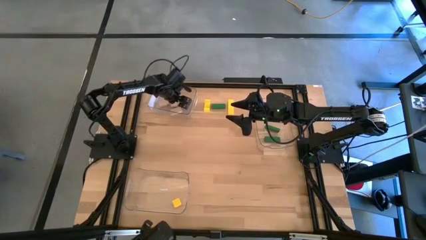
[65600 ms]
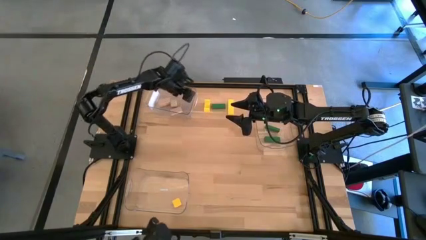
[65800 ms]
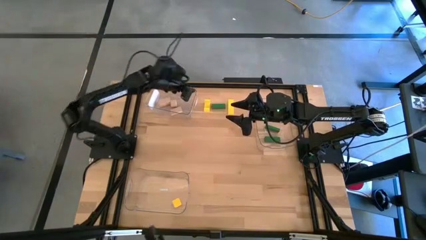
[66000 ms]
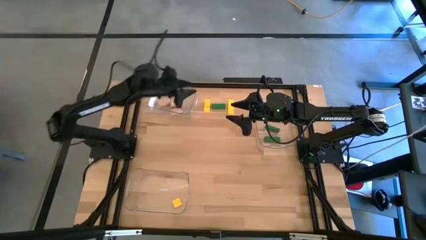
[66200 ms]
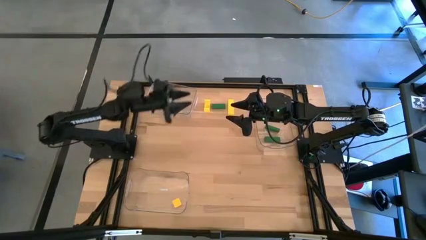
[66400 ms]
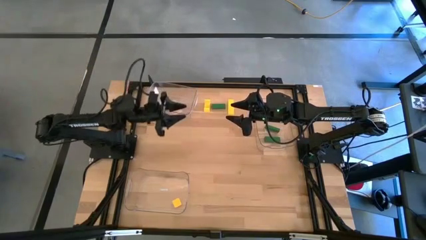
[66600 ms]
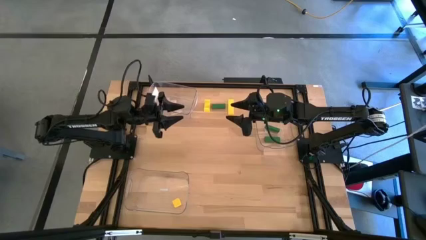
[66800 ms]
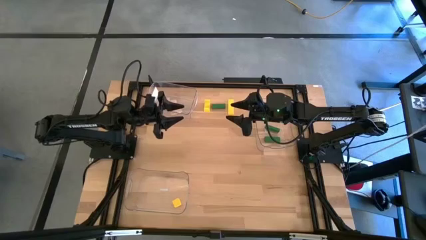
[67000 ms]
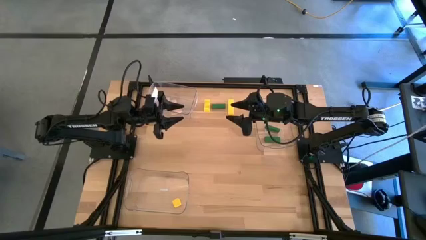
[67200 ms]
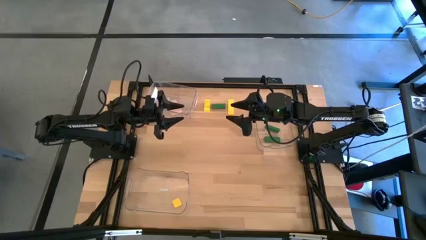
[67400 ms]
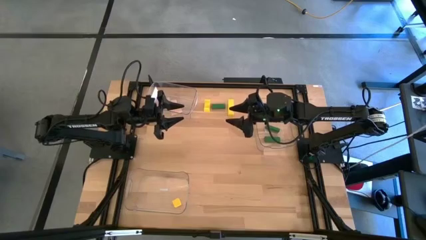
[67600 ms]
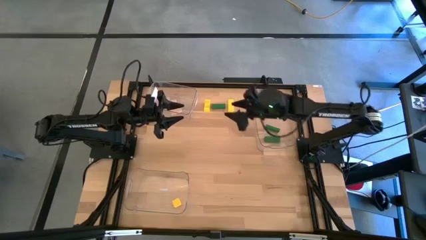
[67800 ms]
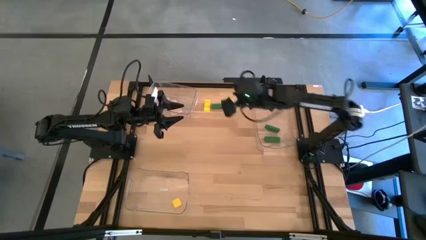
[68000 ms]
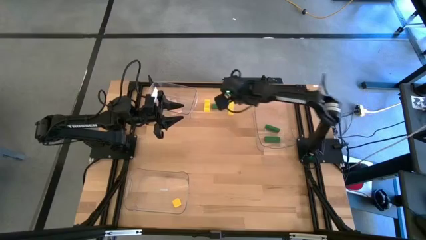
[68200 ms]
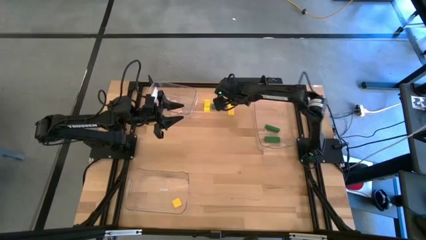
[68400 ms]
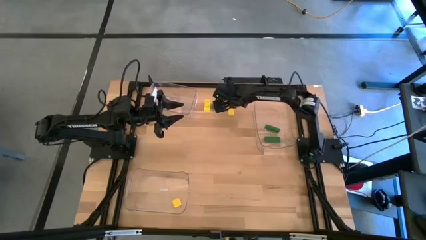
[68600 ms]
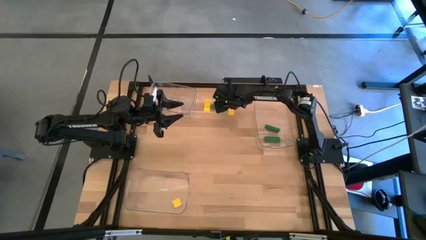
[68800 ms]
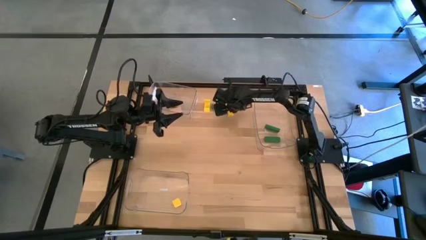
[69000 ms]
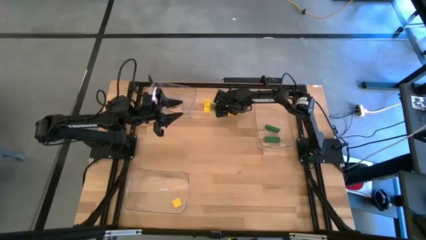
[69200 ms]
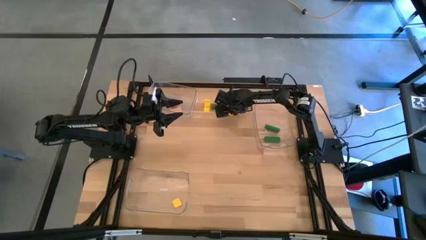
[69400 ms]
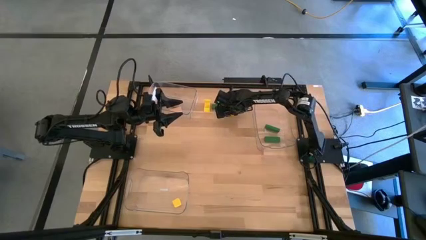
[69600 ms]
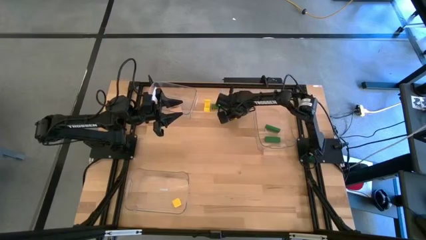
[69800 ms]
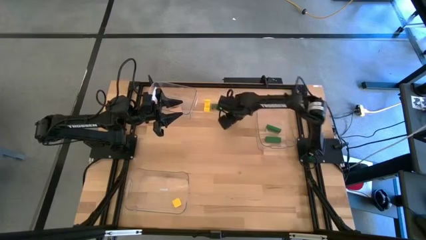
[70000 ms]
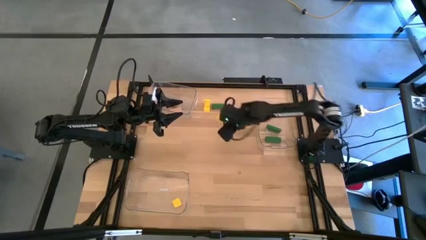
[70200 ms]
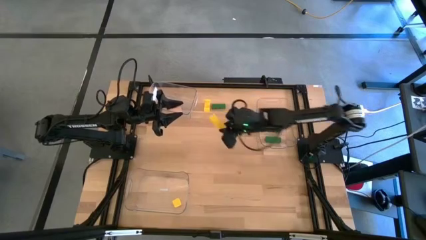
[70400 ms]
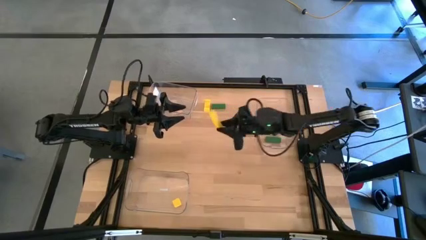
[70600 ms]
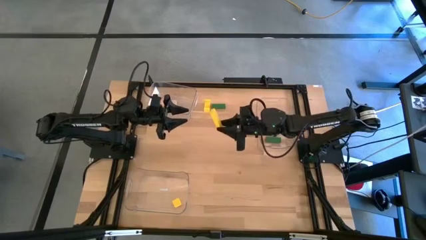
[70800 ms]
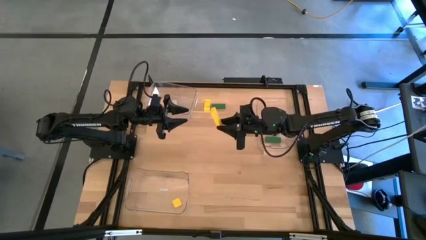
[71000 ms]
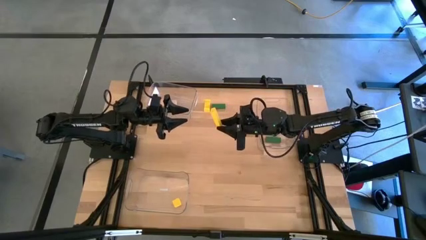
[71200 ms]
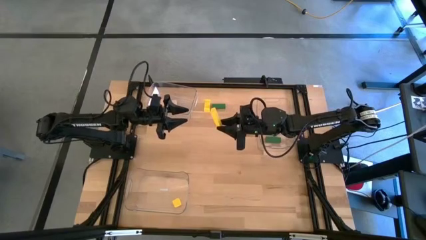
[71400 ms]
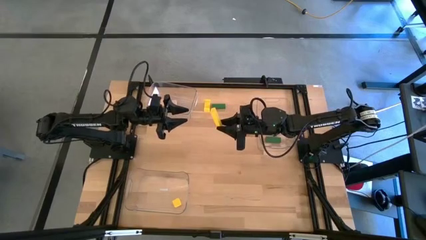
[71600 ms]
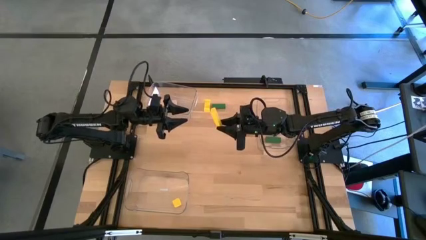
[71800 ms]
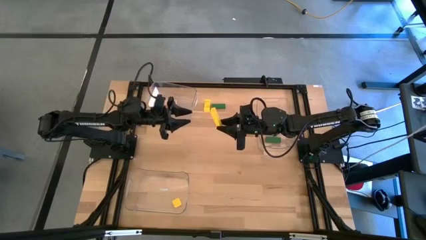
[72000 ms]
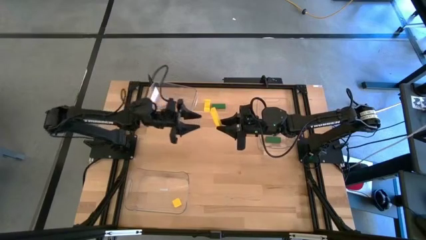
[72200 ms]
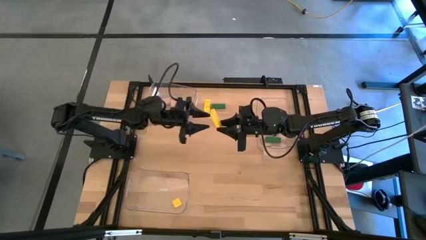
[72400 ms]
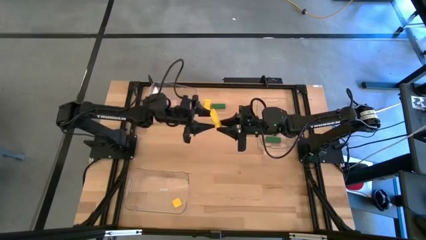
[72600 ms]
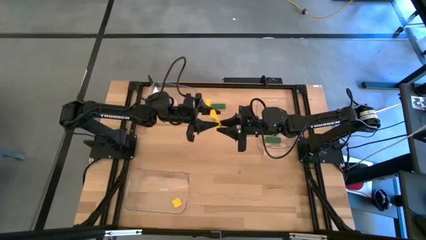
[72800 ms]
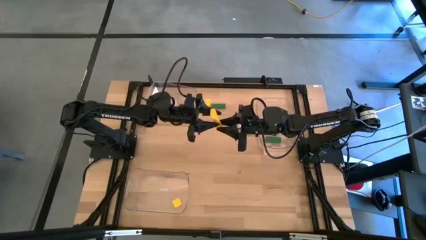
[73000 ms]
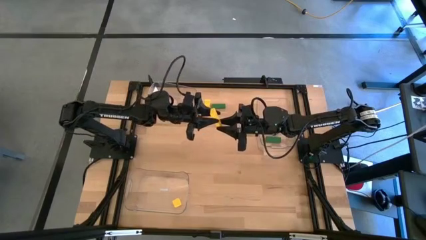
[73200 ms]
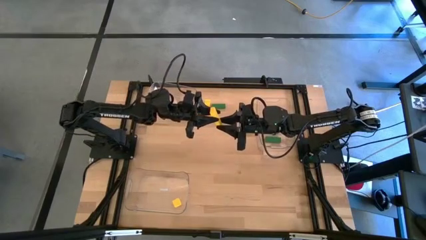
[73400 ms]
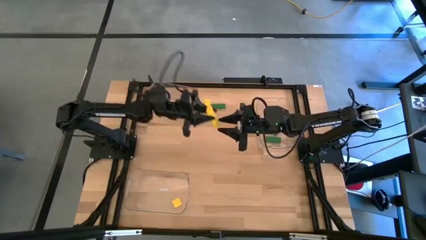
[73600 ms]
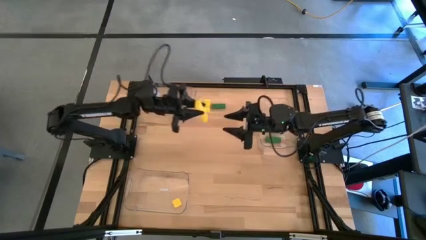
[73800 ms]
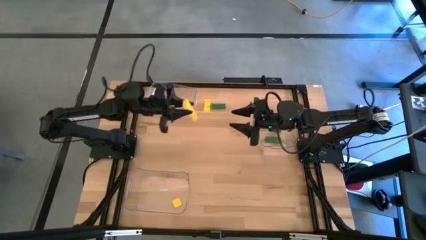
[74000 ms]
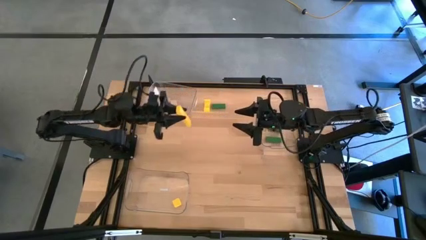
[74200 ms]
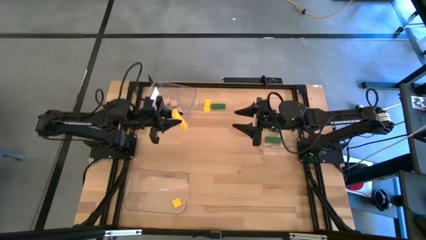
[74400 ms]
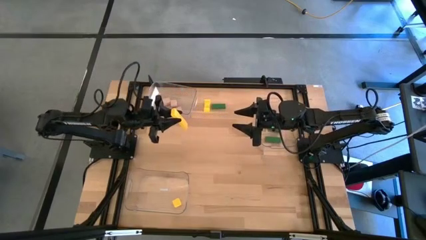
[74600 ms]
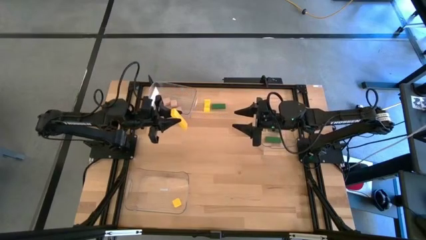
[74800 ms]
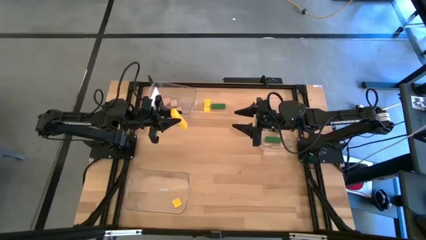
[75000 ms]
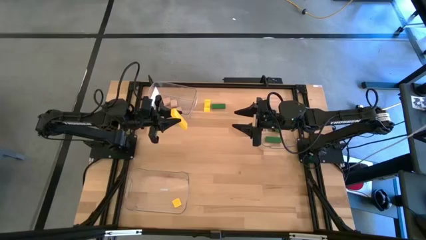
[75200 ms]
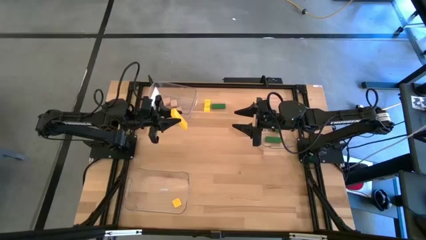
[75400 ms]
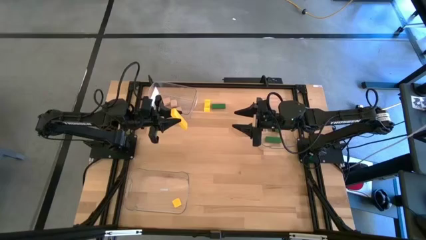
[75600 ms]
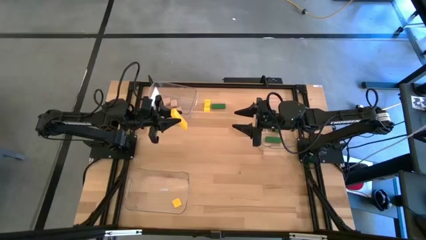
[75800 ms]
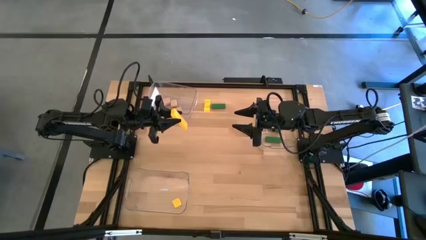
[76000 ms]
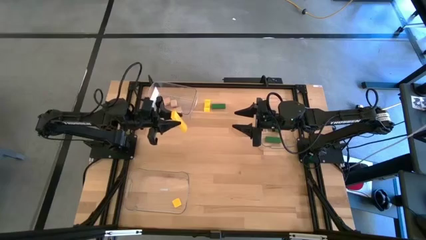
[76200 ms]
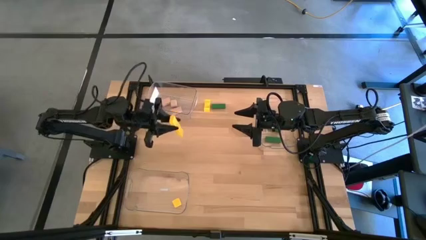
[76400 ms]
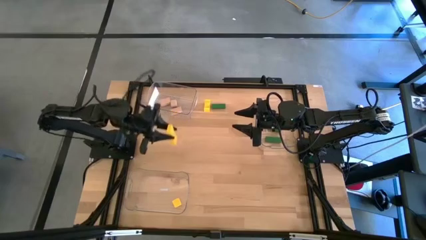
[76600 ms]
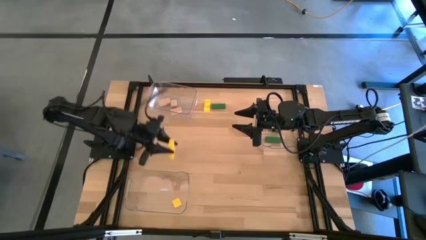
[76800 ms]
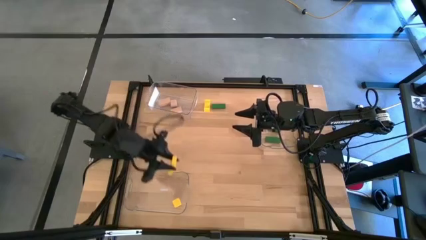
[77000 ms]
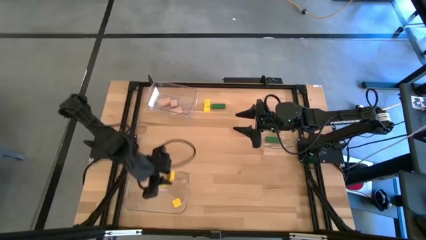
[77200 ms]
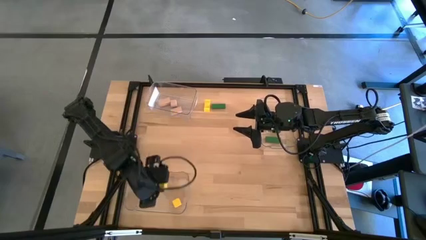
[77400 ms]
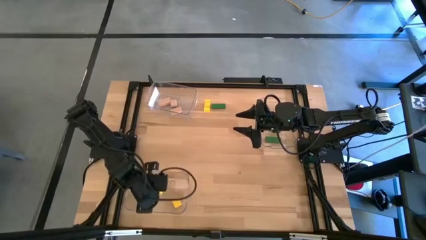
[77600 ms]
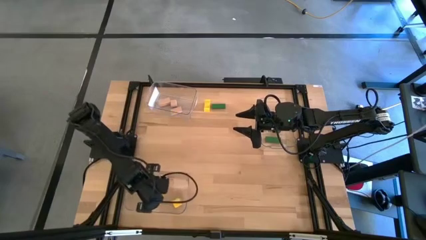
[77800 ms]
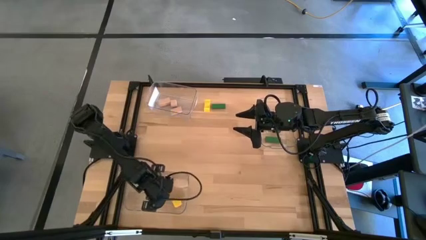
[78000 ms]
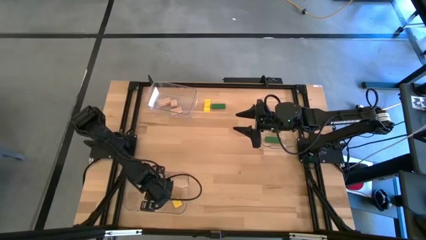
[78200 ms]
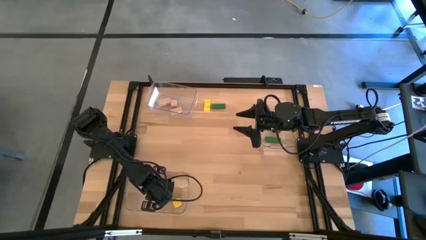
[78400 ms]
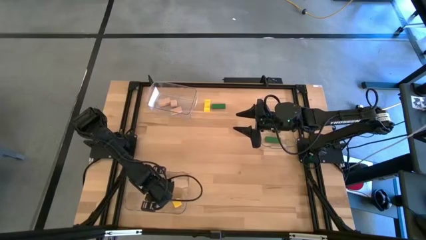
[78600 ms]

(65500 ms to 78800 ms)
Task: Sort & place blocks by color
Put the right yellow block into the bottom left transparent bin

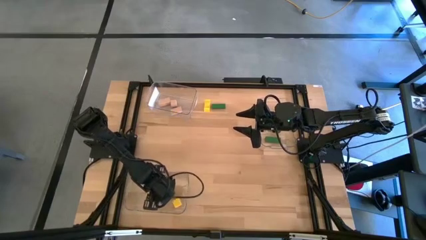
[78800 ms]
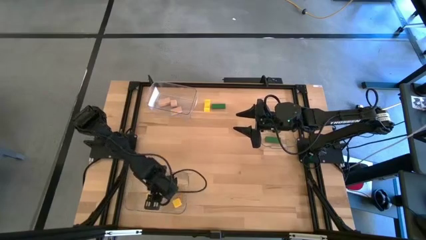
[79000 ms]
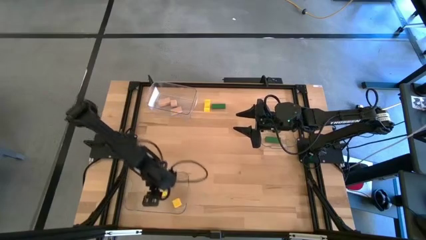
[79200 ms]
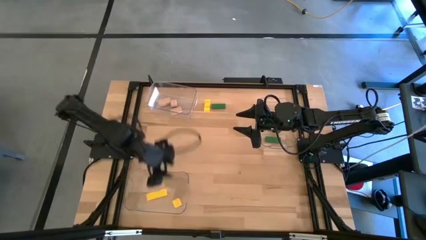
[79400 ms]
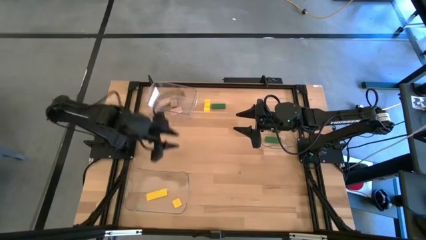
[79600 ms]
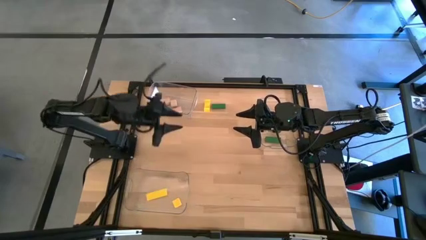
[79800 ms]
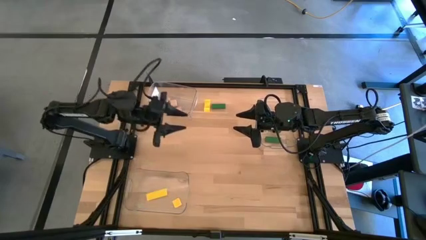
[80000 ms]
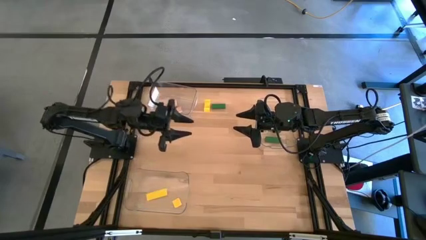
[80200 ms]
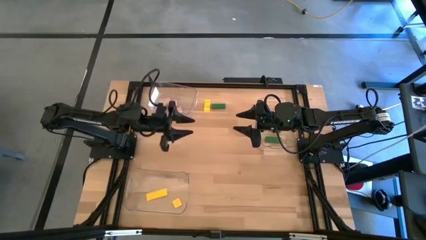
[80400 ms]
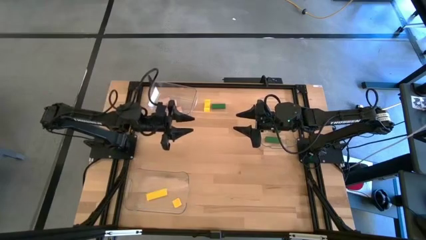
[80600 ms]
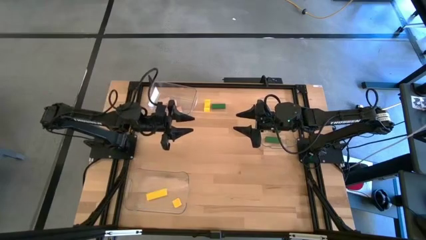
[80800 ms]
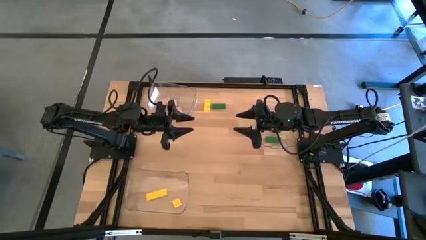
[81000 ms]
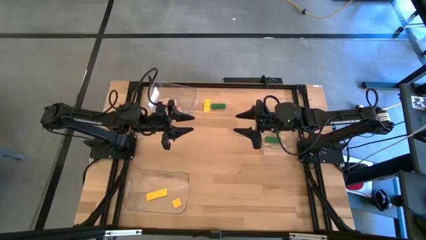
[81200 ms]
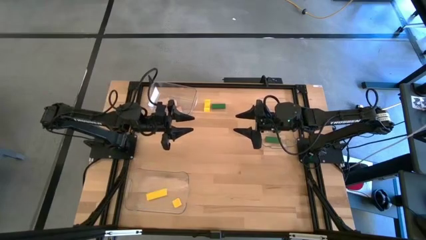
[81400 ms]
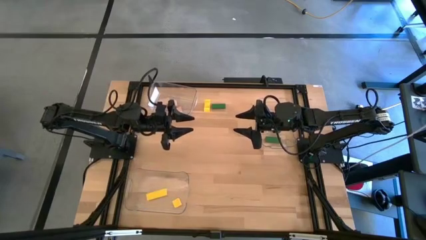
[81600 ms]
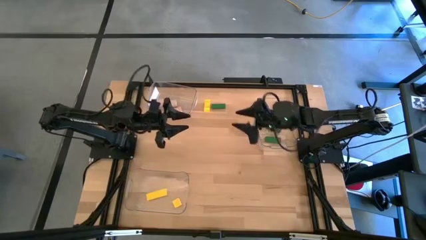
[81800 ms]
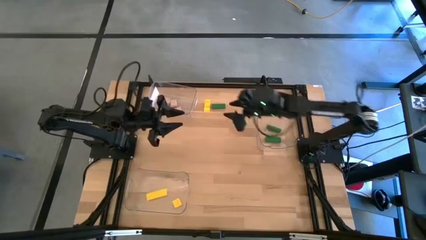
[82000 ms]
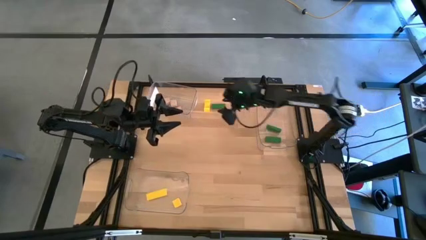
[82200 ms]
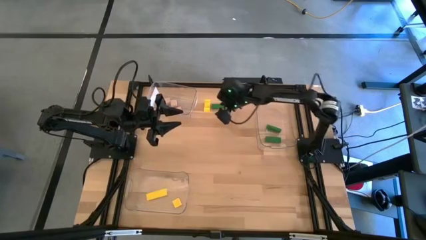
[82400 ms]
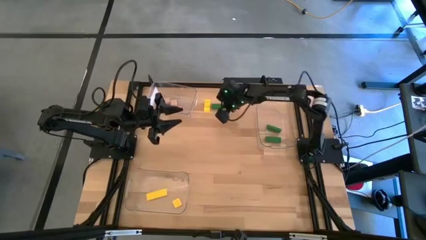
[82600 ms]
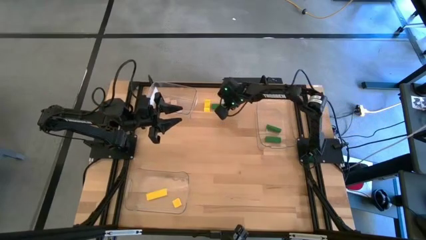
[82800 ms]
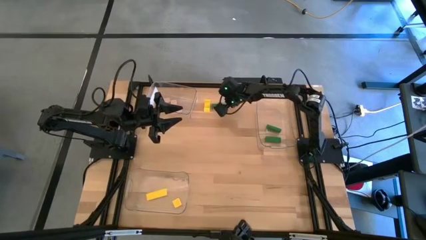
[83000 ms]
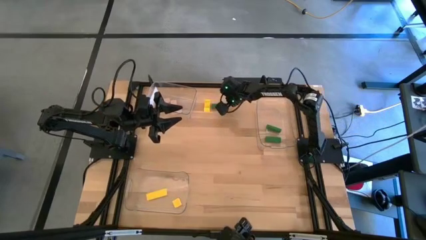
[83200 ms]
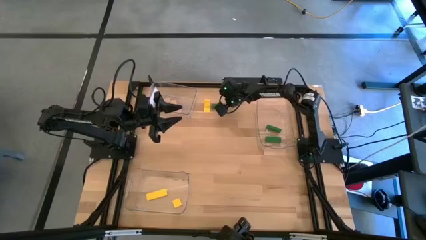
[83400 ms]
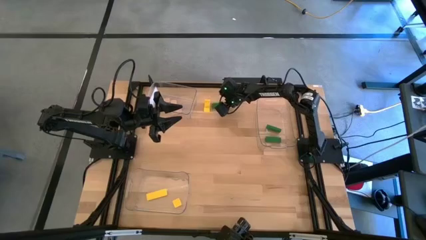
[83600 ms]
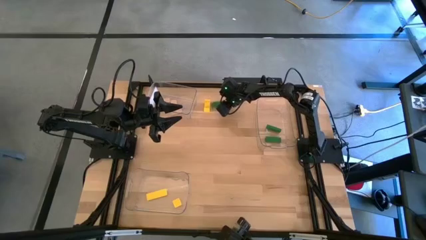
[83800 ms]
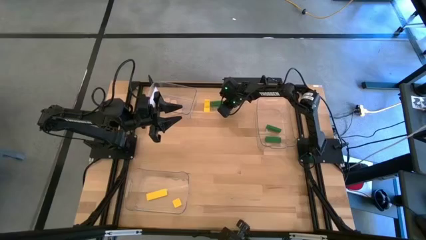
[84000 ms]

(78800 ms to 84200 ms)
Put the green block into the top right transparent bin
